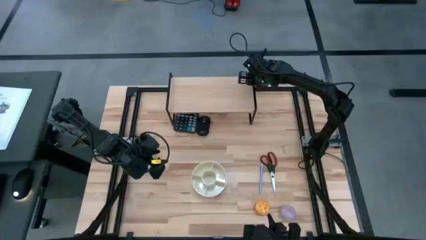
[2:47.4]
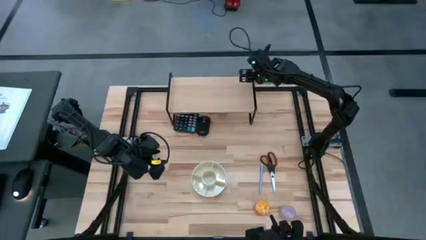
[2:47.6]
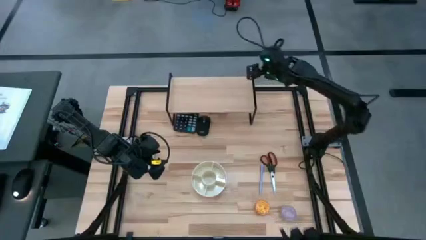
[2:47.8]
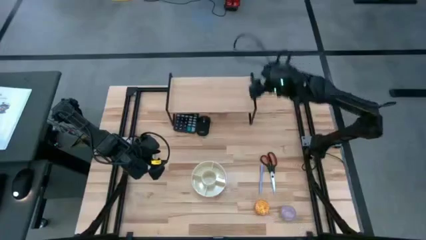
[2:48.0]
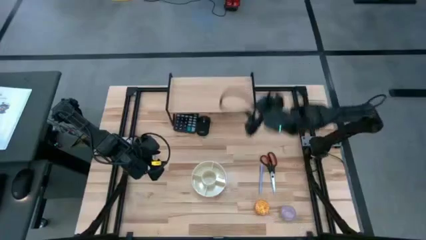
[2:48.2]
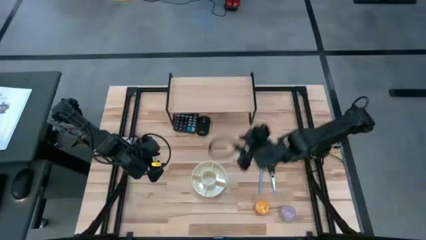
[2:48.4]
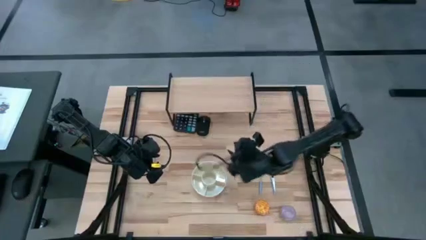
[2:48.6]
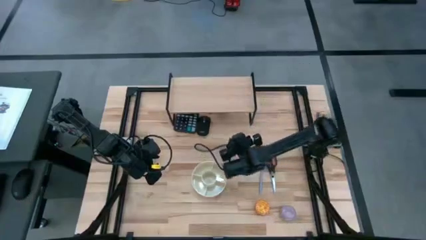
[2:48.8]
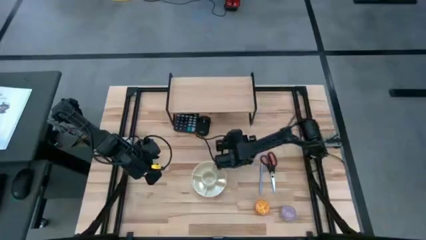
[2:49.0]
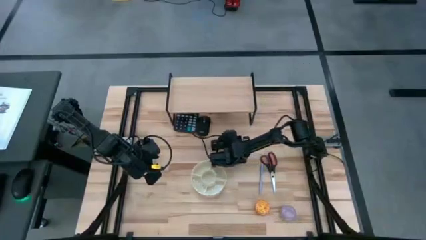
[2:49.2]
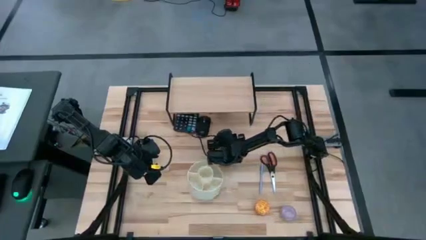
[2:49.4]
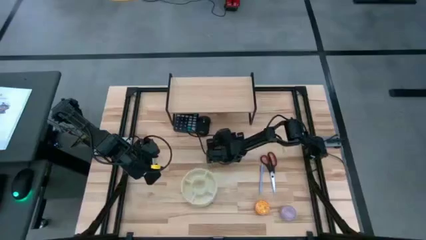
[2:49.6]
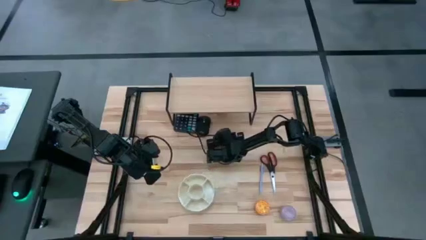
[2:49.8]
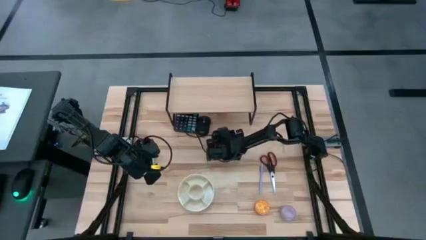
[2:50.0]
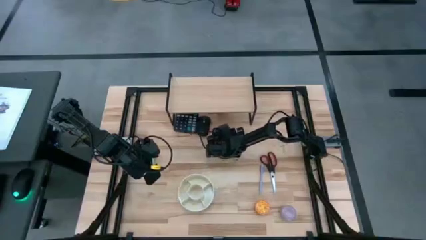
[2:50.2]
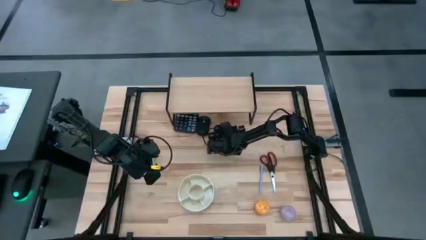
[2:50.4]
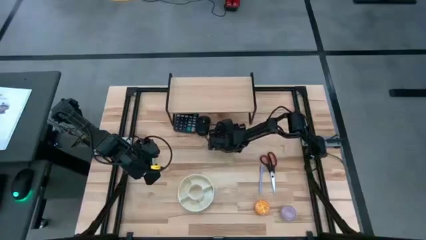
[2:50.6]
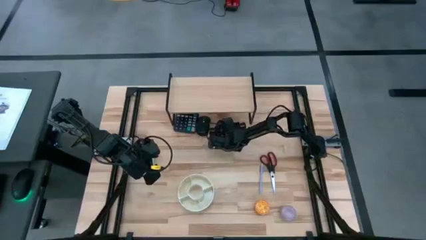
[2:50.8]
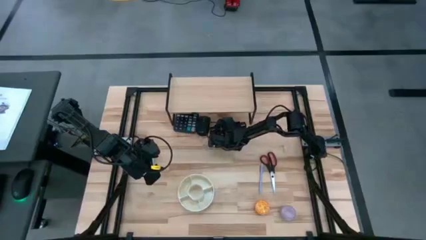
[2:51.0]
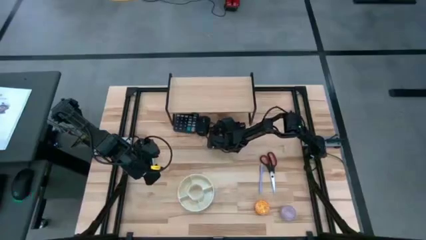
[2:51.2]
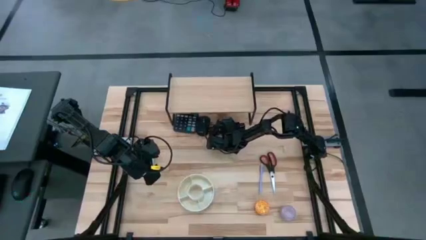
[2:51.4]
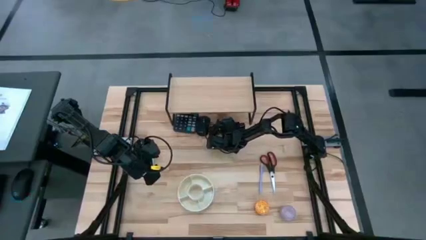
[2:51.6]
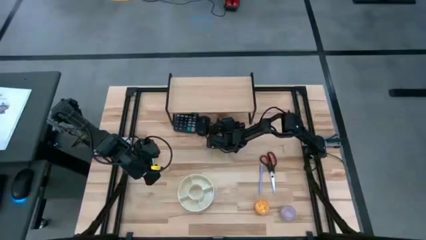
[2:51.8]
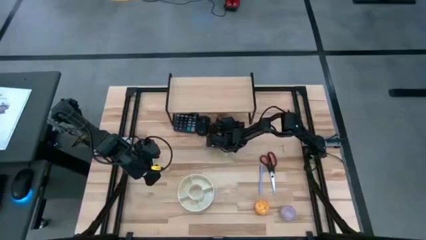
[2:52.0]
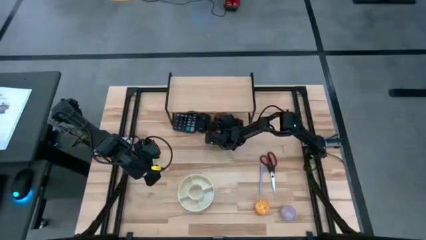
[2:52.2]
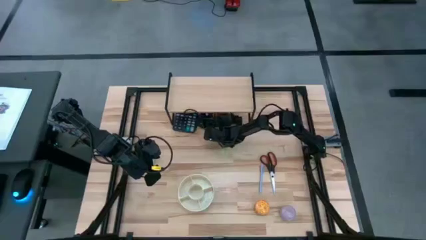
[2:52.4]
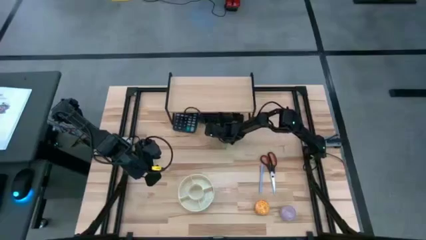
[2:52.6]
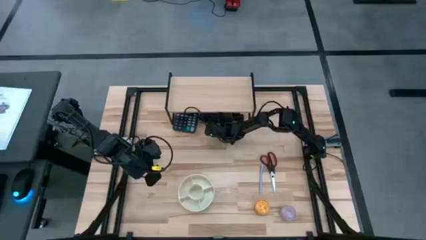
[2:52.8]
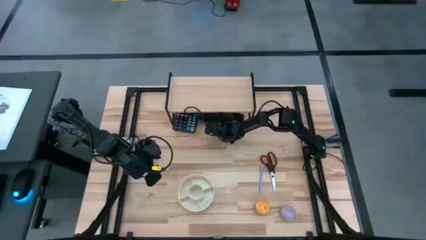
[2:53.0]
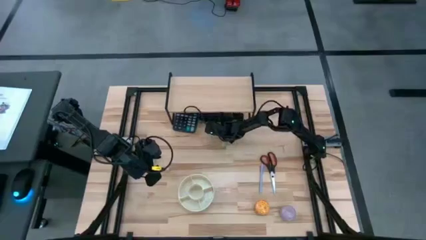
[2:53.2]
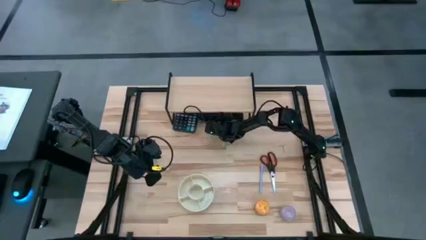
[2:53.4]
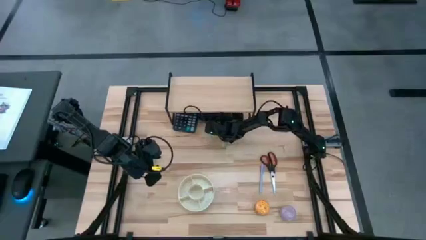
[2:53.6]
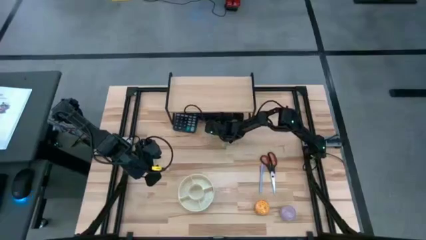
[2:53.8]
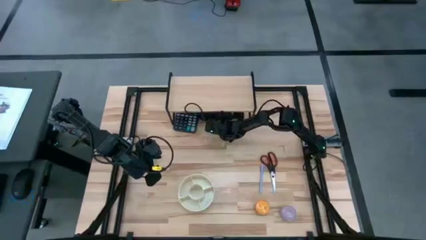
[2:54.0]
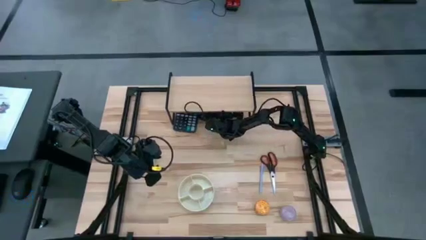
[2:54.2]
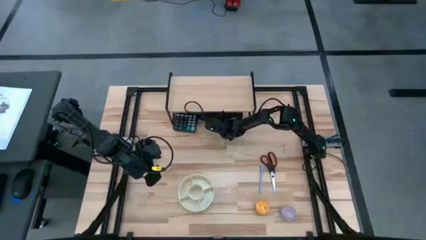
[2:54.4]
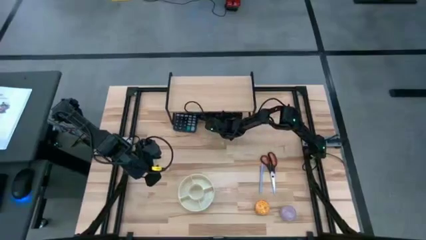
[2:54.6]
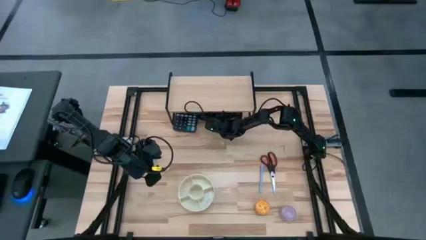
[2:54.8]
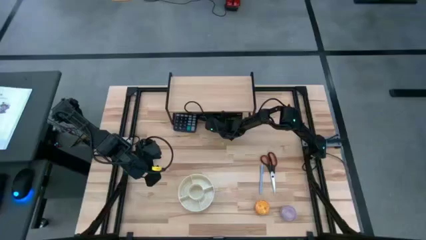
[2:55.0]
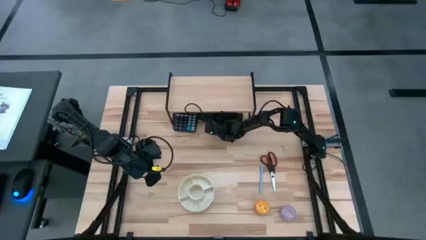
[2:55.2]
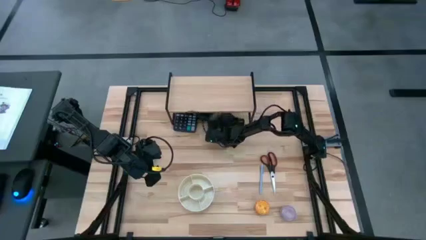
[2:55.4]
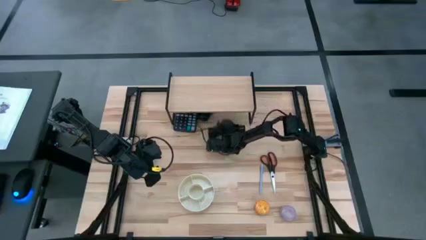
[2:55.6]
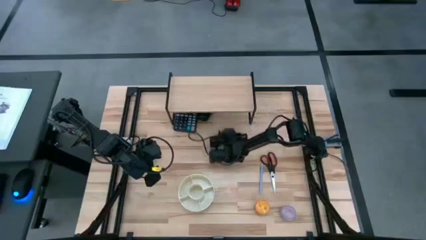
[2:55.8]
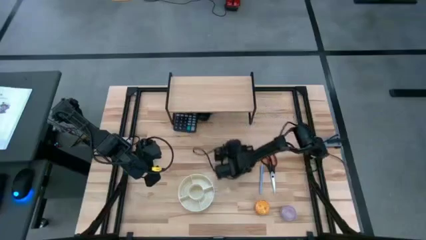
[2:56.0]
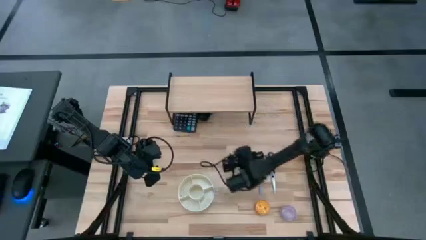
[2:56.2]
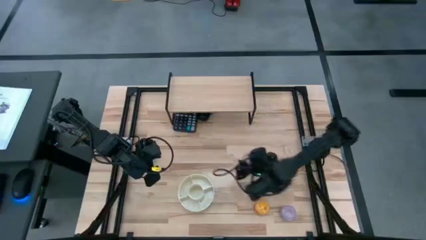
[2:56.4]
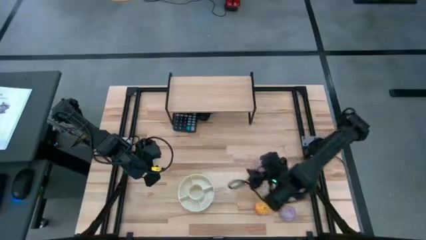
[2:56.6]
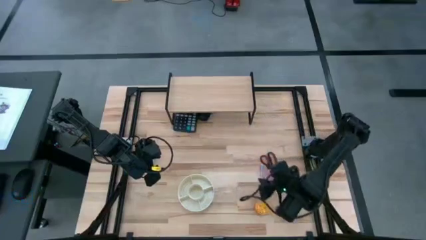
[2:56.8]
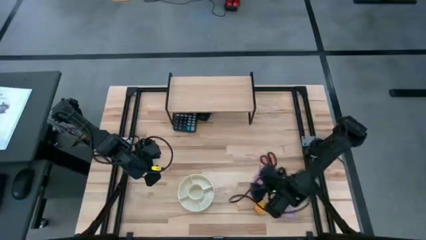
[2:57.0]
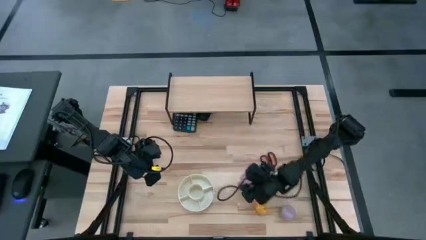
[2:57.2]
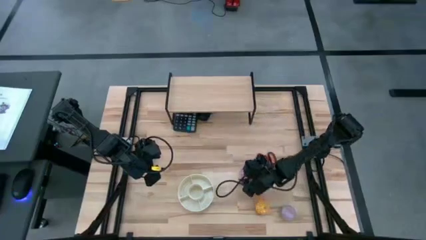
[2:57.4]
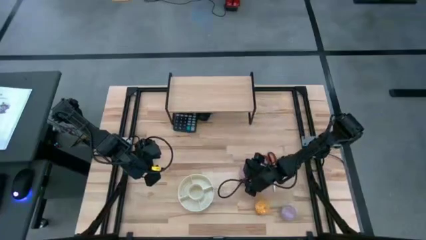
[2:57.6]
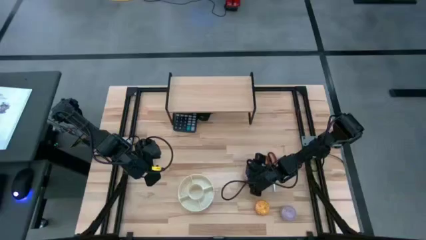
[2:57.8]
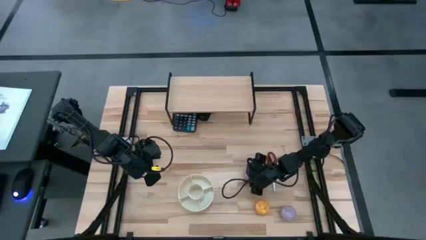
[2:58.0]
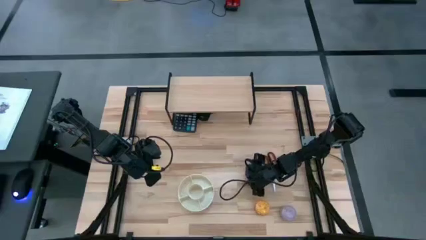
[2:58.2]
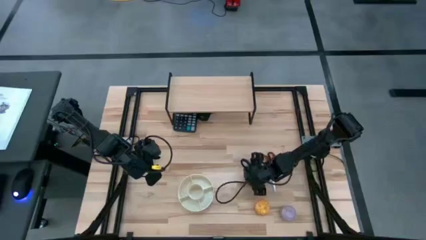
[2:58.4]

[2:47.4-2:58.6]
Task: Stock shelves
Remove the red scented candle from under the shelf
